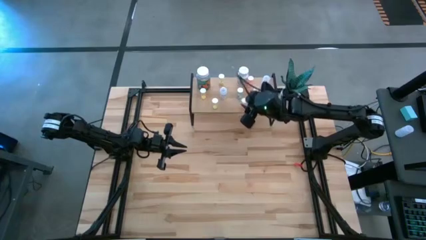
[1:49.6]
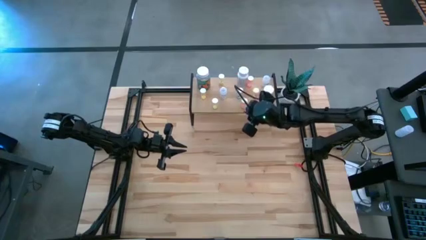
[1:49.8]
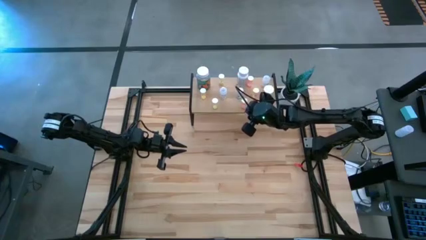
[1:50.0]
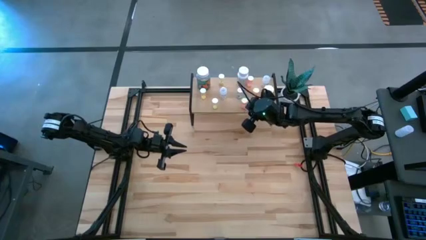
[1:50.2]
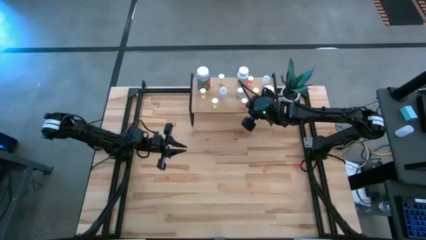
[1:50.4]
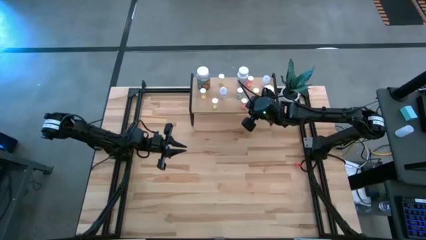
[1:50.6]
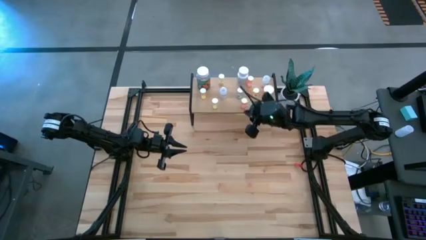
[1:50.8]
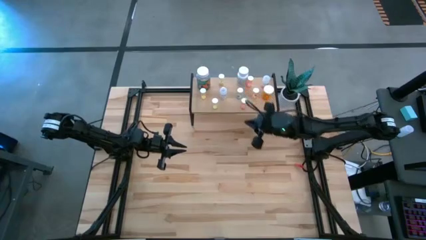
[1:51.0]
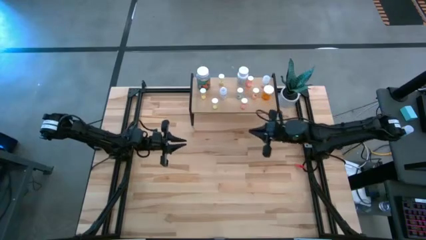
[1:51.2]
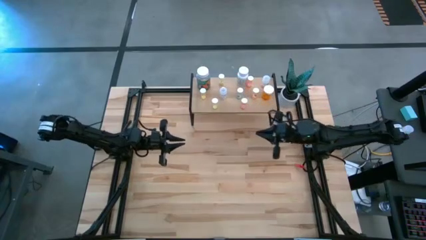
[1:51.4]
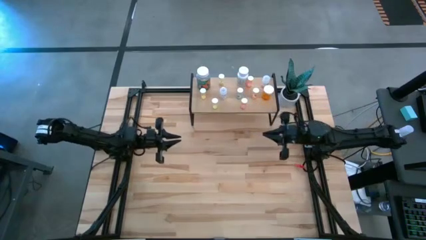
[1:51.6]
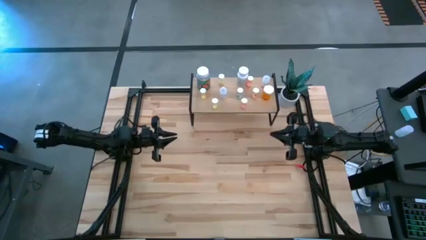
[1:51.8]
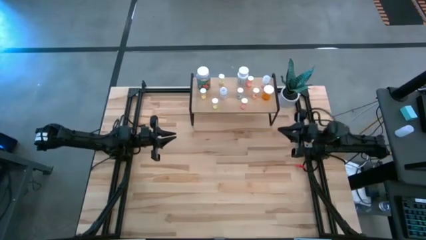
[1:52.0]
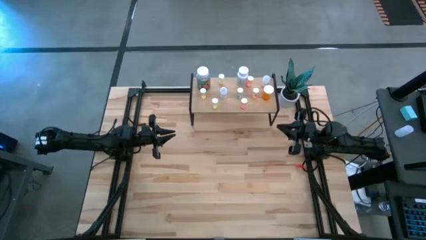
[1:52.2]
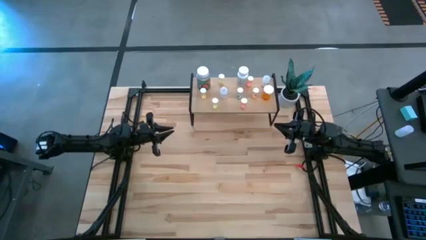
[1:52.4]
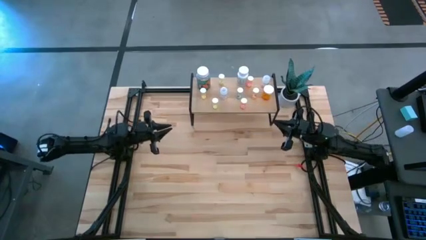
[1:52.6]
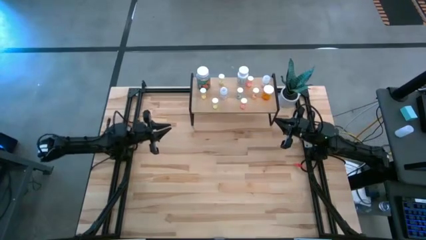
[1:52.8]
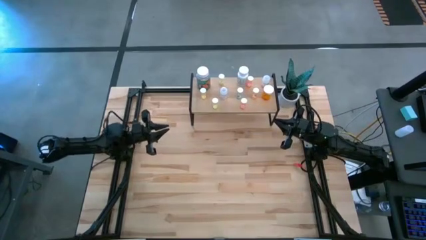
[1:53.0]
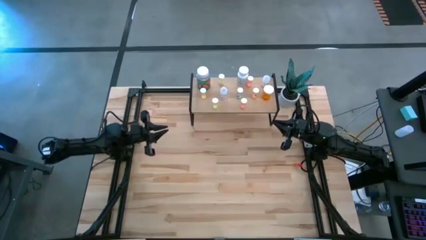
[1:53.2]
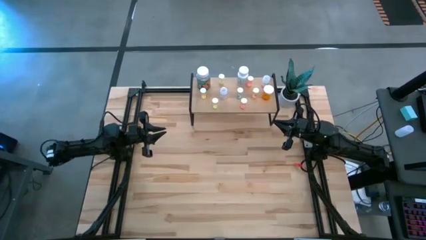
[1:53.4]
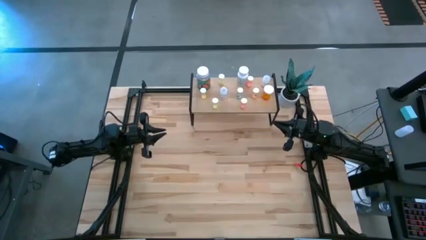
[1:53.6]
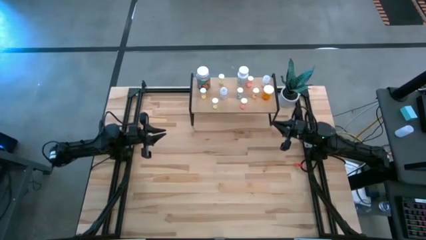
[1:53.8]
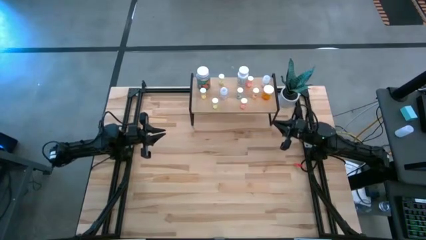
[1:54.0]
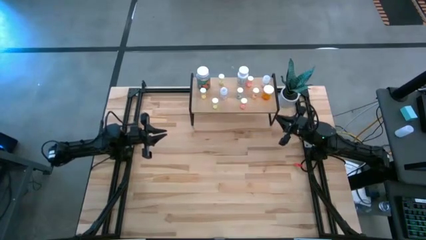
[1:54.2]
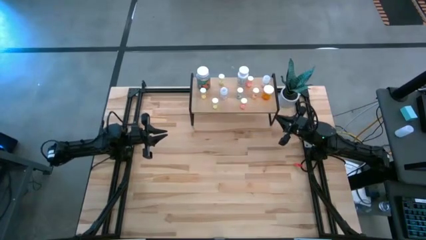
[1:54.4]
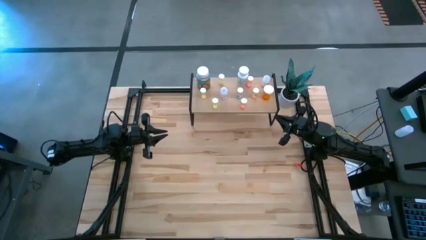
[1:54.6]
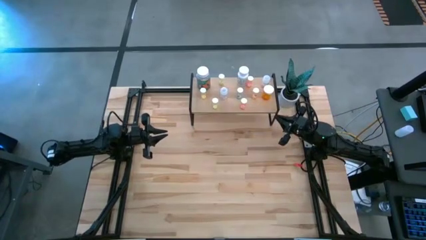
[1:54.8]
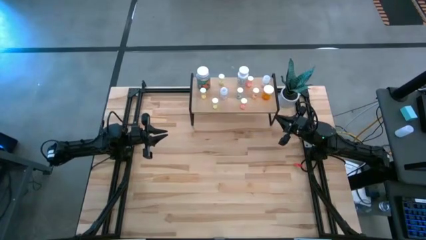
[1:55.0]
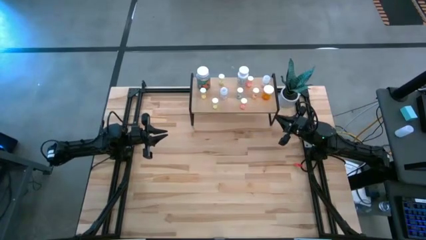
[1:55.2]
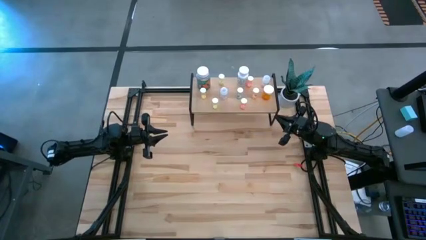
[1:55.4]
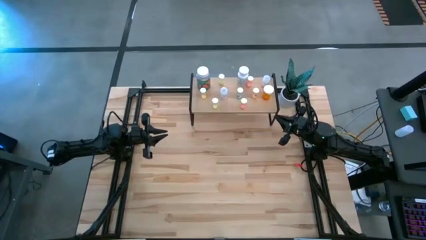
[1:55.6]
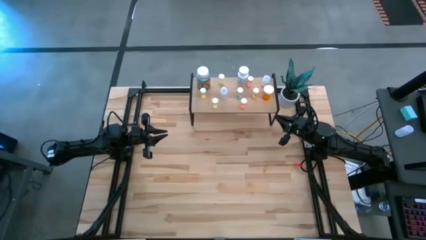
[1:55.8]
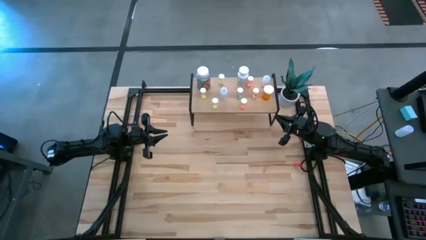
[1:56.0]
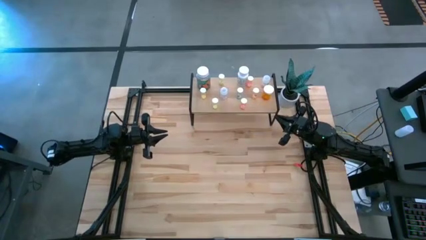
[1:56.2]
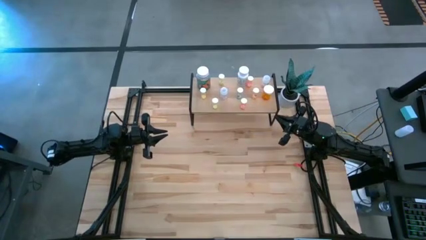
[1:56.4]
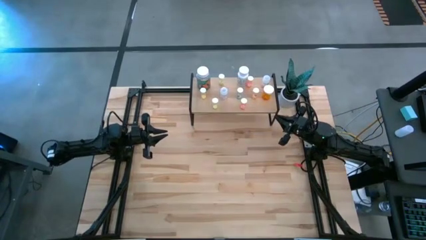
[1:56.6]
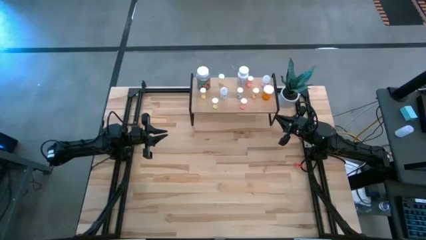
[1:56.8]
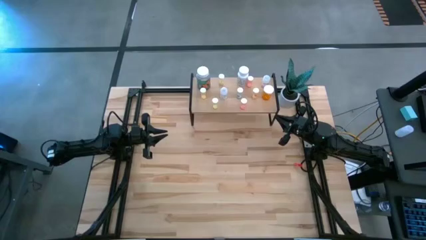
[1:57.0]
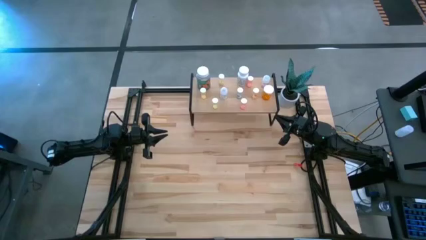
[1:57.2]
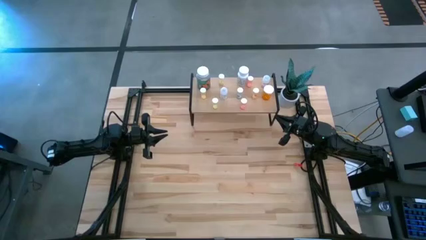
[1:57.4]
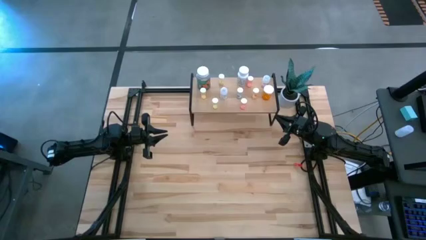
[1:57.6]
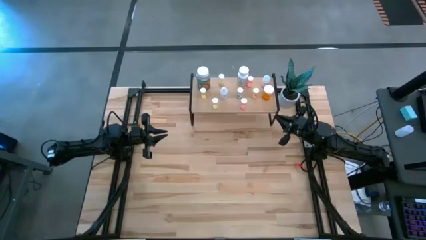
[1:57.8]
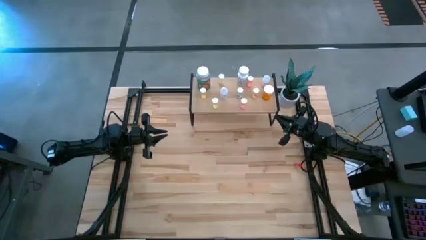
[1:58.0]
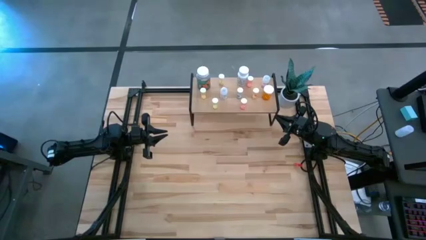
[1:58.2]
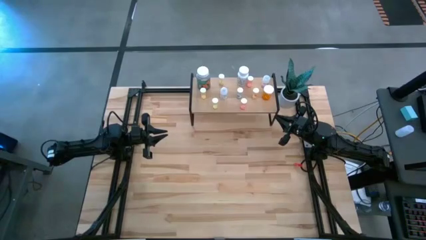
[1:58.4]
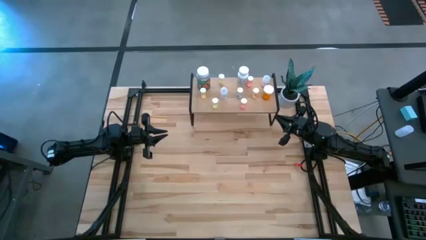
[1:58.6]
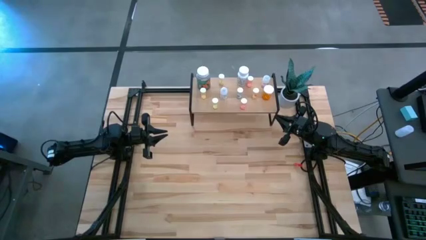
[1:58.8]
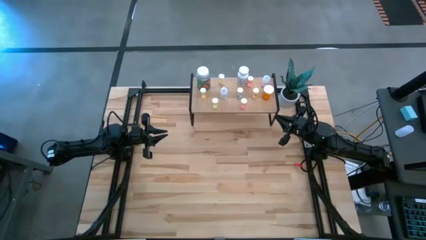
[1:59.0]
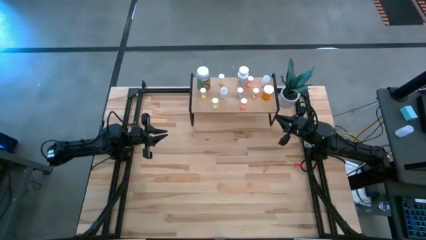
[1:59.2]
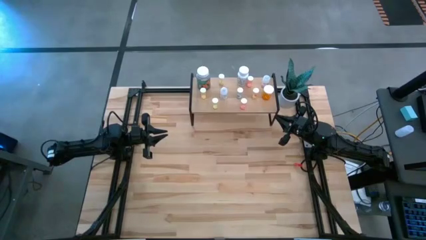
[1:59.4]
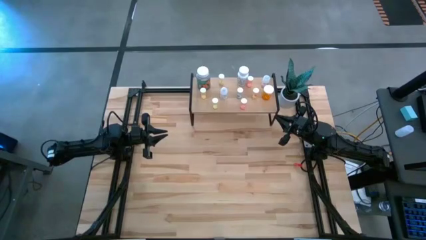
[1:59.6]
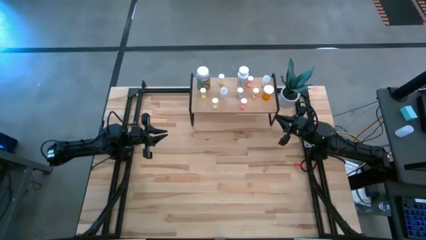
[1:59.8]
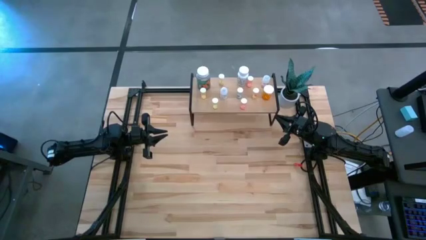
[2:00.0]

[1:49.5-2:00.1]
Task: Pick and place medicine bottles onto shelf by color
Return to Home Position

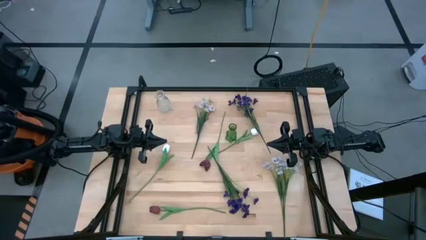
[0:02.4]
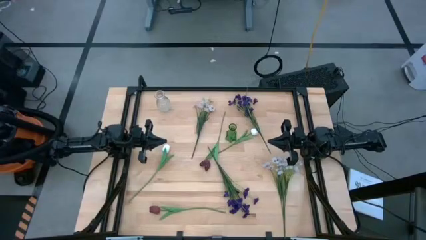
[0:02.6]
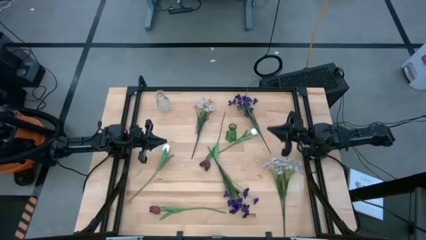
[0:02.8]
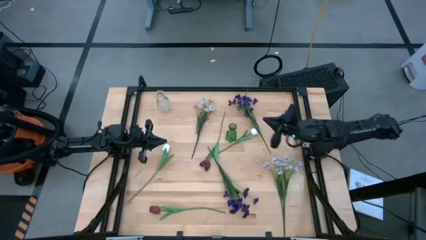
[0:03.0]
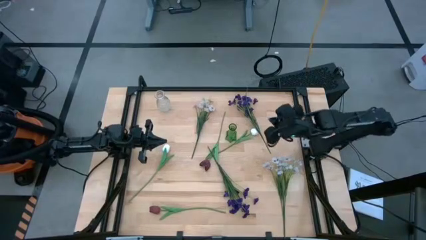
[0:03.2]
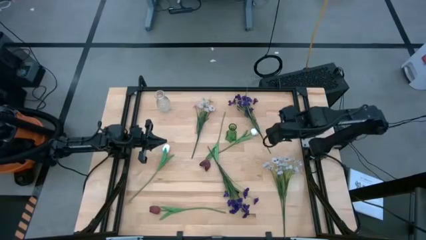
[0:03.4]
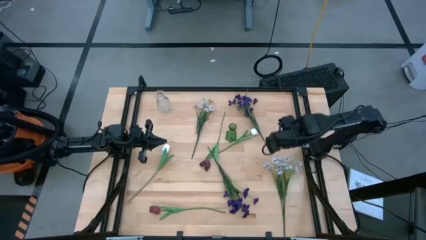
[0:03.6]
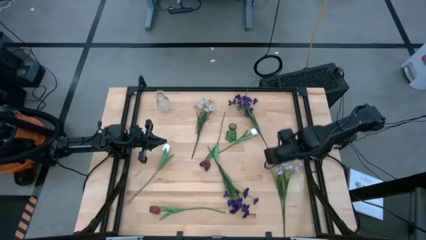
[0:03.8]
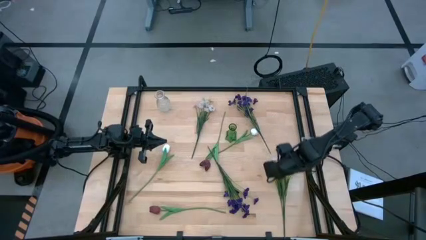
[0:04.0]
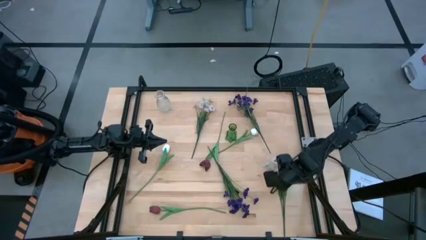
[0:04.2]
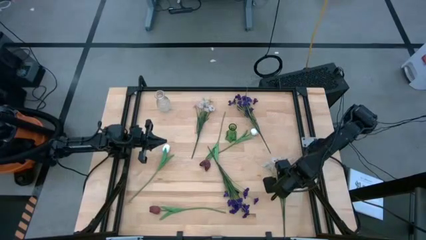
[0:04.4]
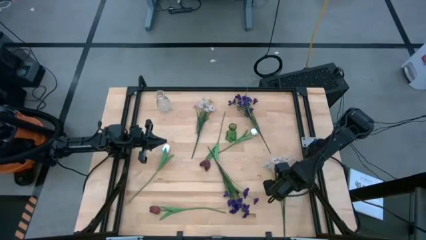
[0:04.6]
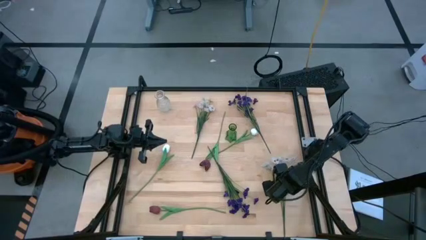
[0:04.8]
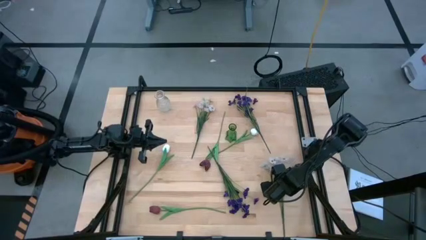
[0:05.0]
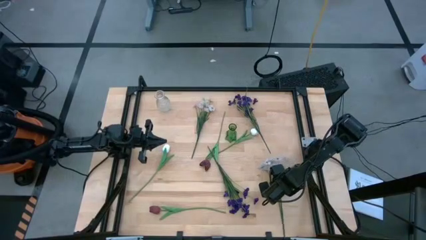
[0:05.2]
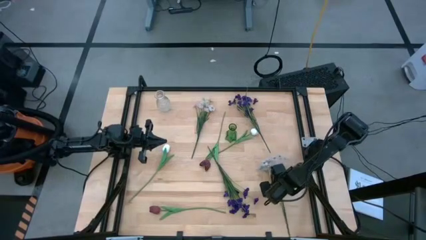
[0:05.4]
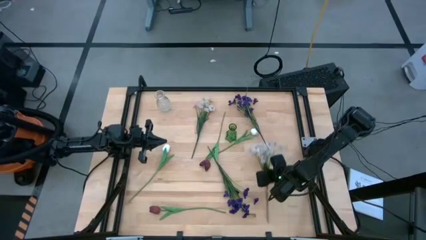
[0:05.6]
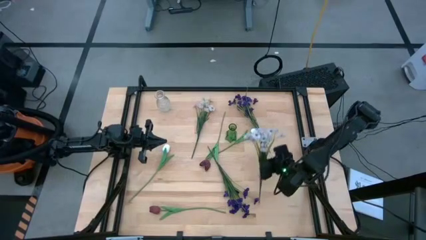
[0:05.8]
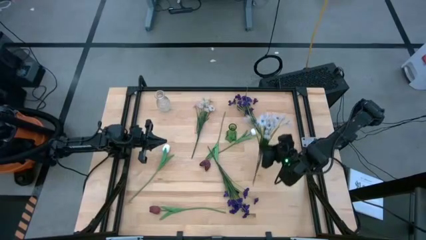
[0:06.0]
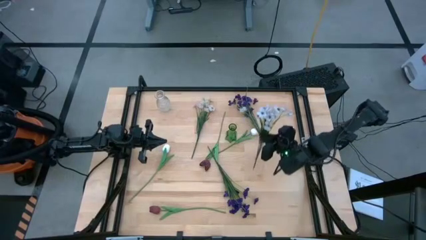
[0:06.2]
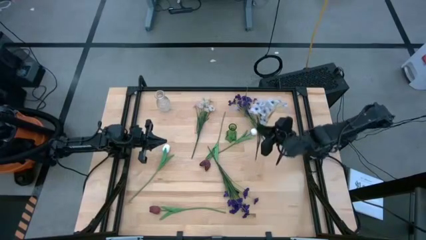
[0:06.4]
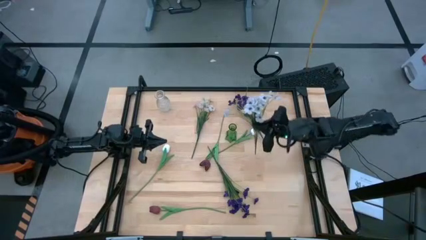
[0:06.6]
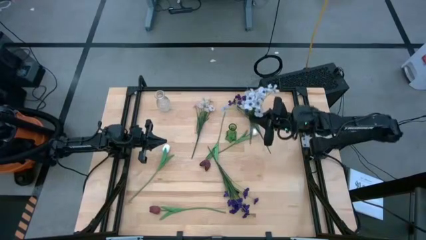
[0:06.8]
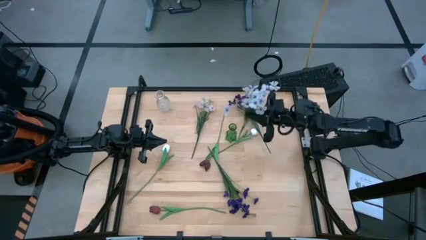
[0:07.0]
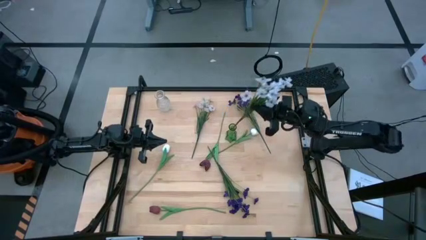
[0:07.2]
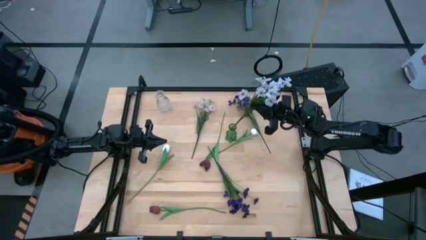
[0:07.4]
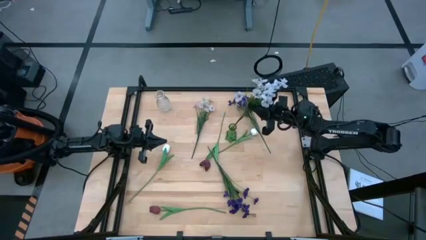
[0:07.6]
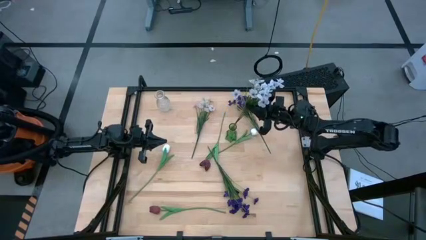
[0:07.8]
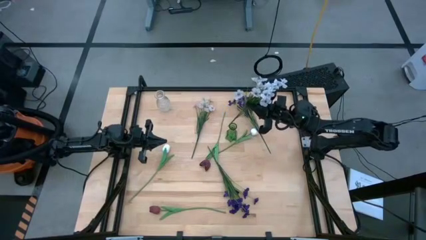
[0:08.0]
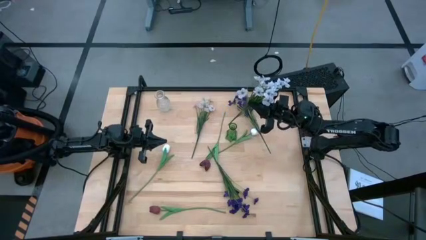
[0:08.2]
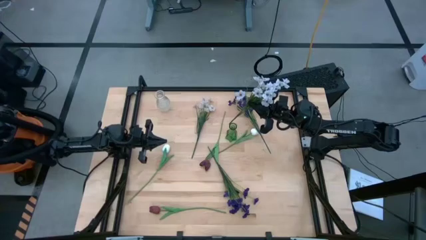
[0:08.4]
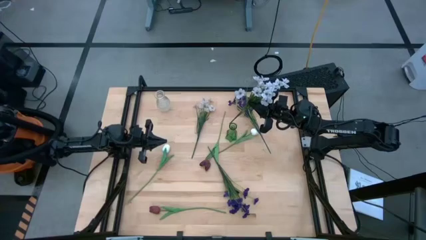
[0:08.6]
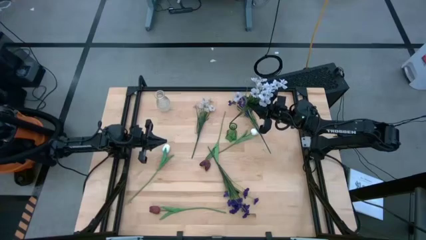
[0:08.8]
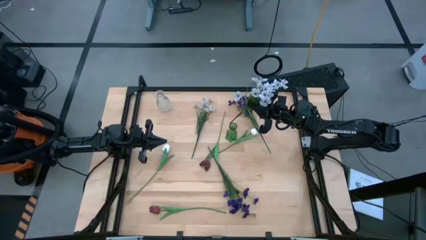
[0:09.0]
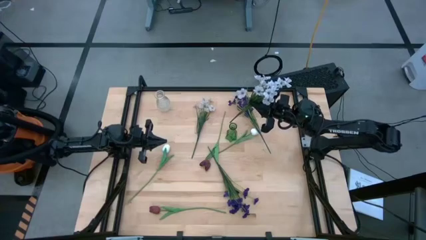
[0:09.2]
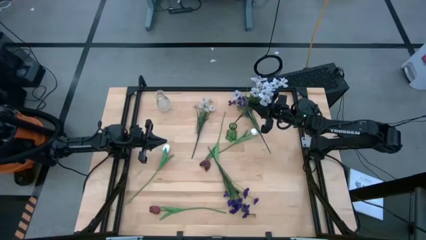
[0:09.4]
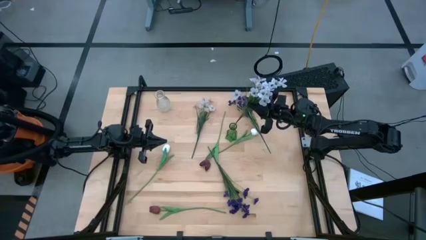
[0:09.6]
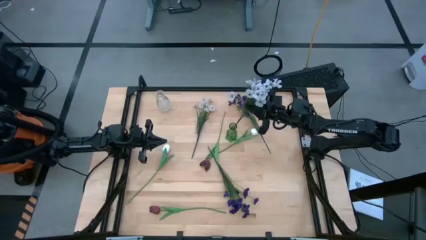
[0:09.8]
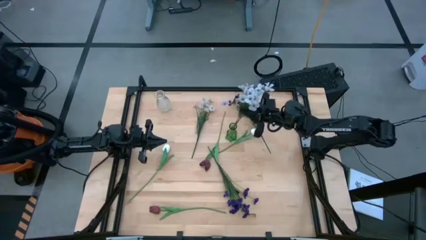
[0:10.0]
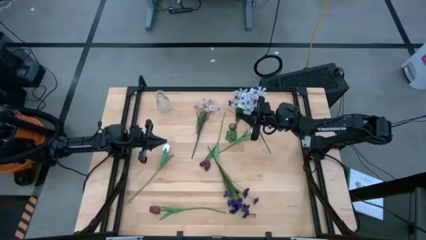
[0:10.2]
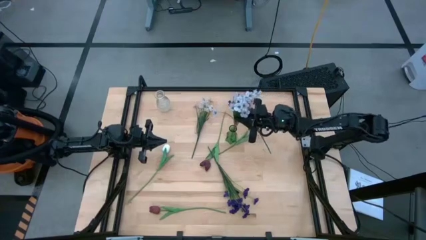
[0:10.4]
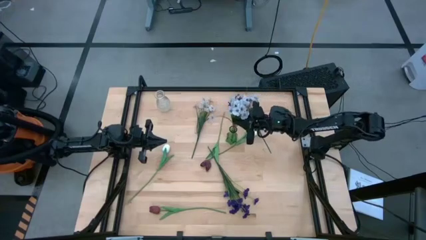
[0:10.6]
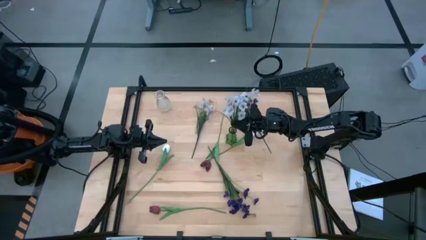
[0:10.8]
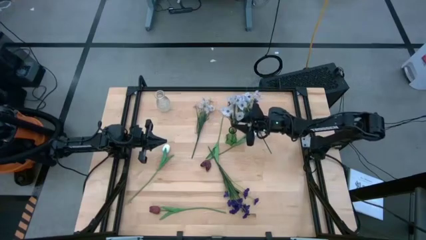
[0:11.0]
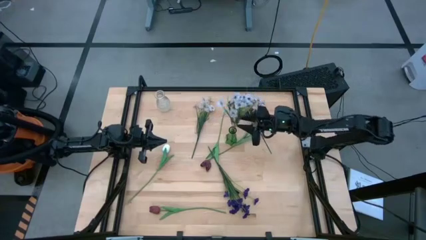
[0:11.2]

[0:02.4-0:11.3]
Task: Sort flowers into vase by color
Put the bottom white flowers into the green vase
